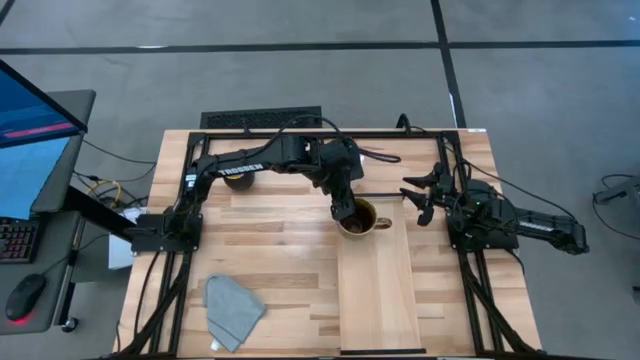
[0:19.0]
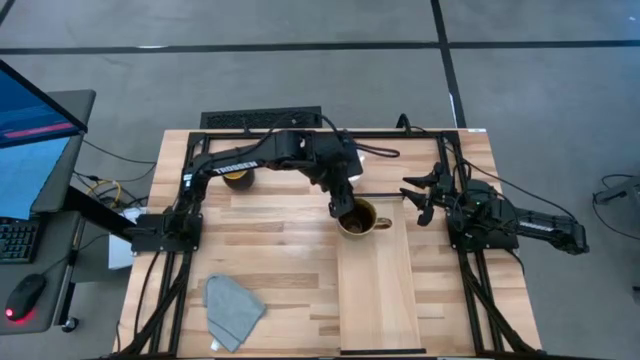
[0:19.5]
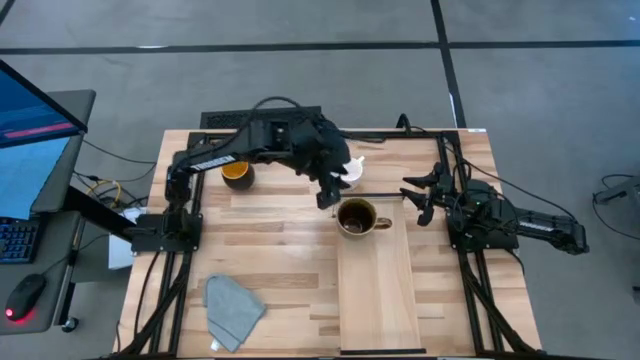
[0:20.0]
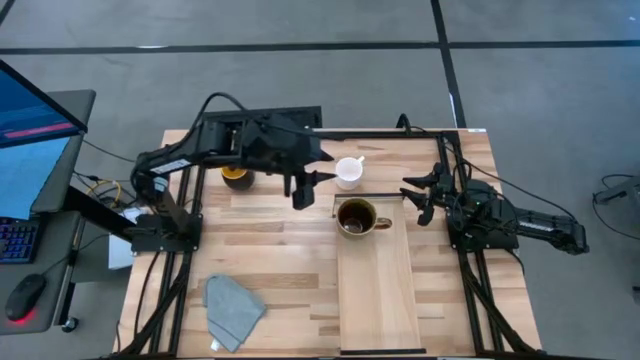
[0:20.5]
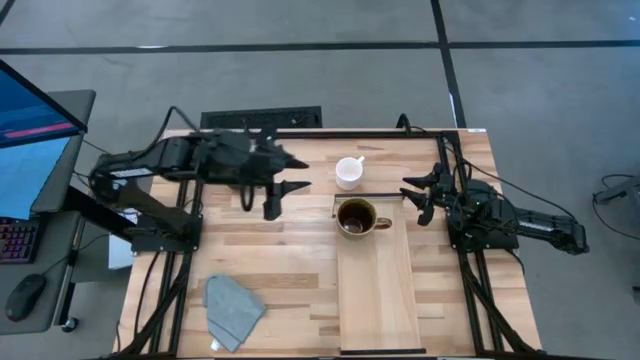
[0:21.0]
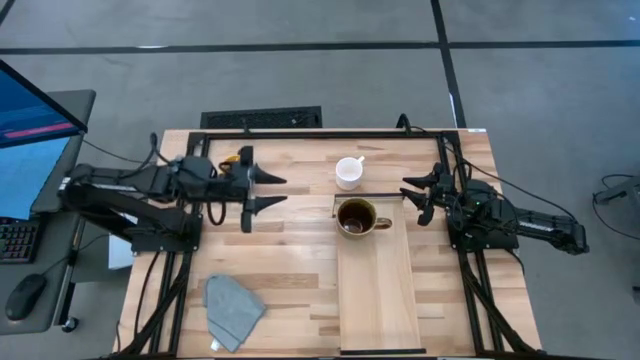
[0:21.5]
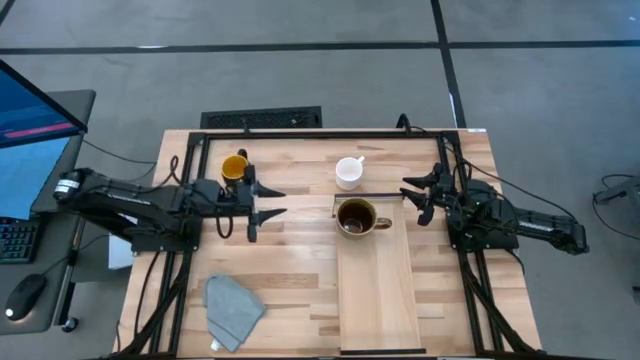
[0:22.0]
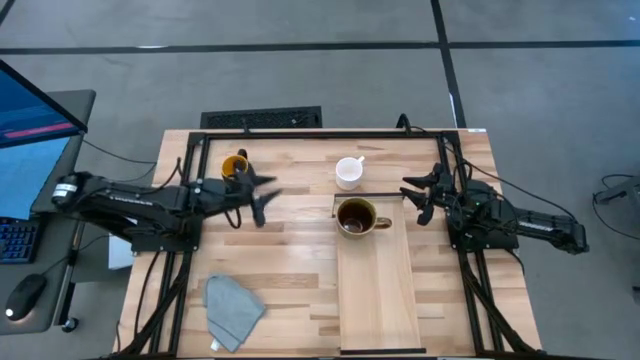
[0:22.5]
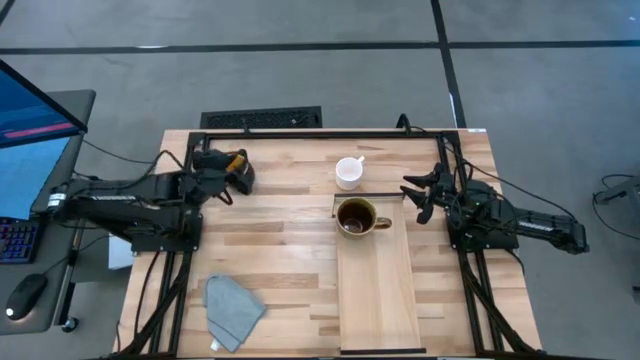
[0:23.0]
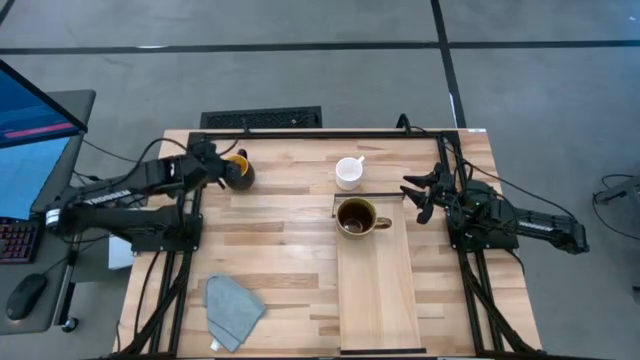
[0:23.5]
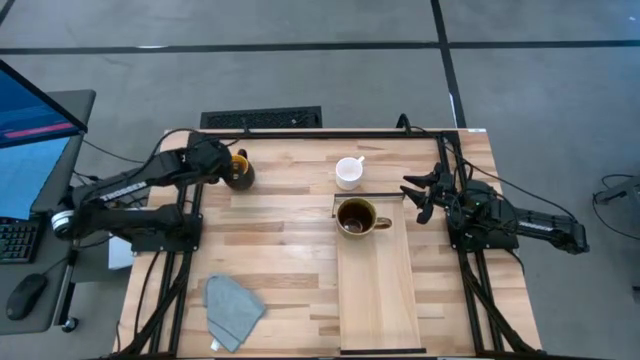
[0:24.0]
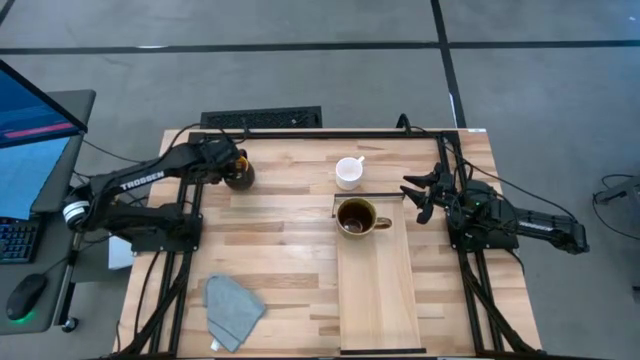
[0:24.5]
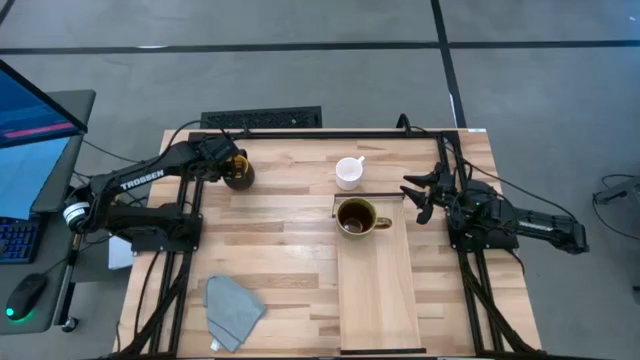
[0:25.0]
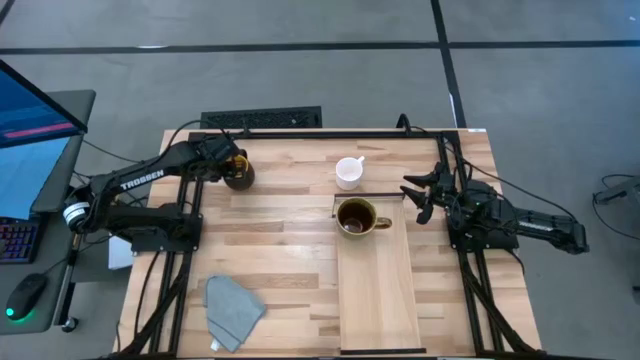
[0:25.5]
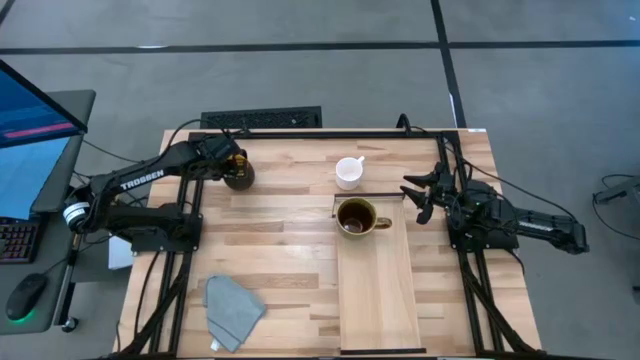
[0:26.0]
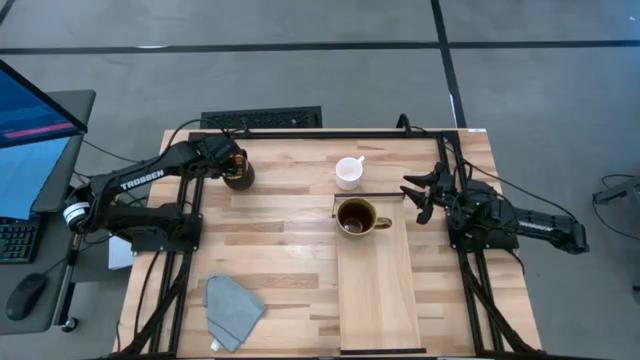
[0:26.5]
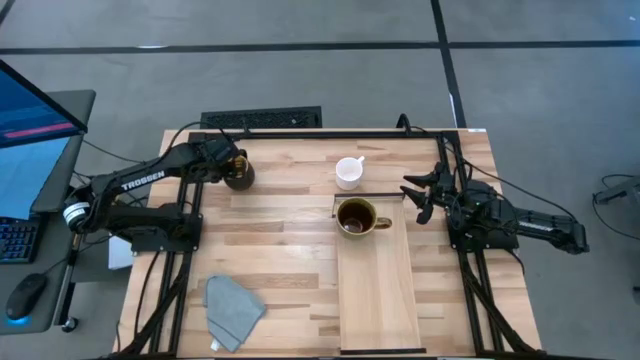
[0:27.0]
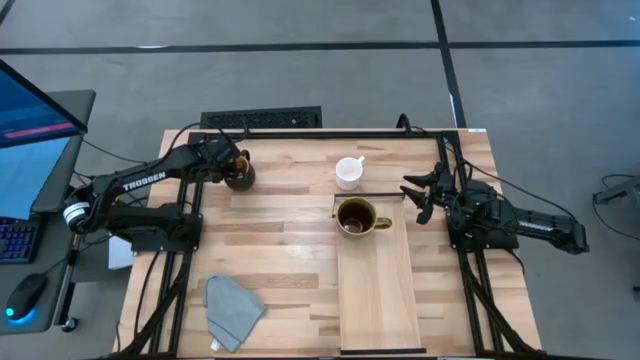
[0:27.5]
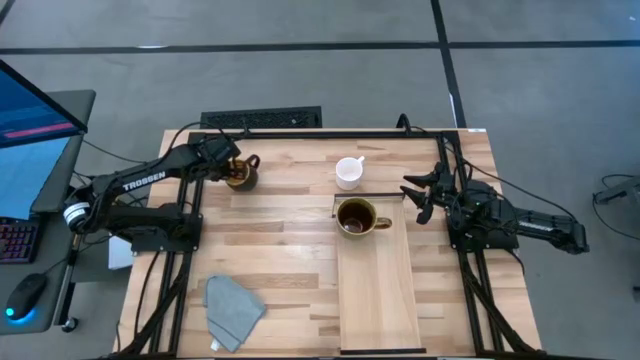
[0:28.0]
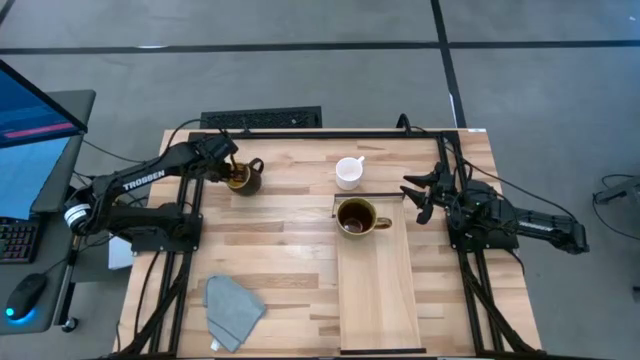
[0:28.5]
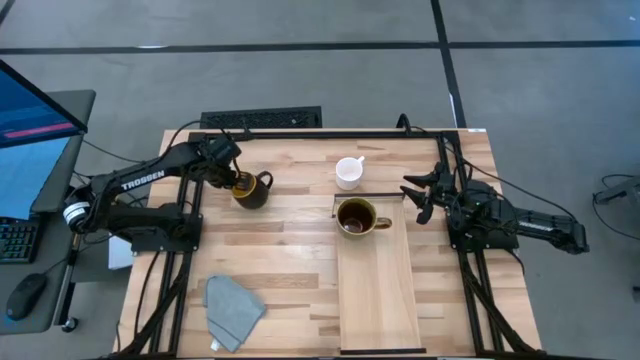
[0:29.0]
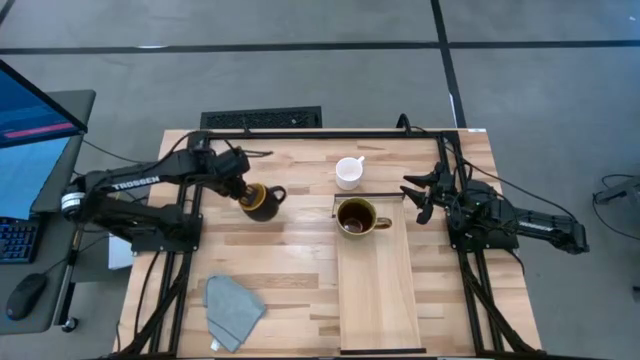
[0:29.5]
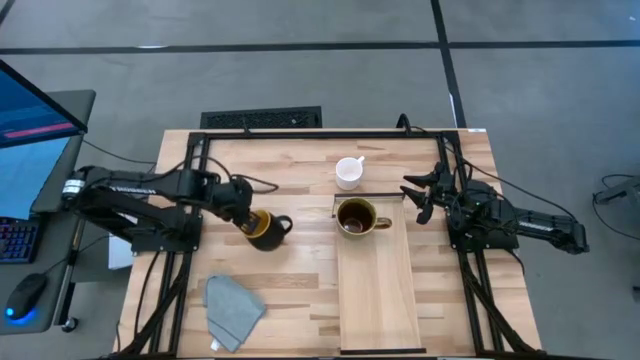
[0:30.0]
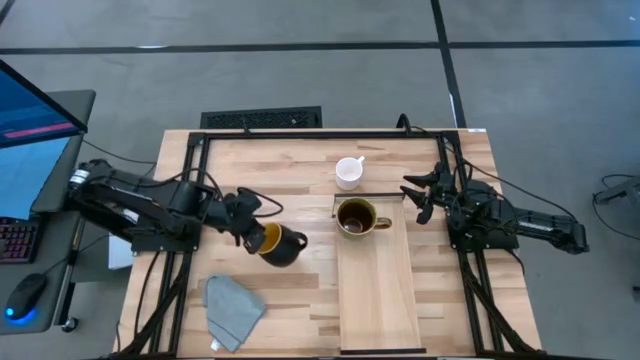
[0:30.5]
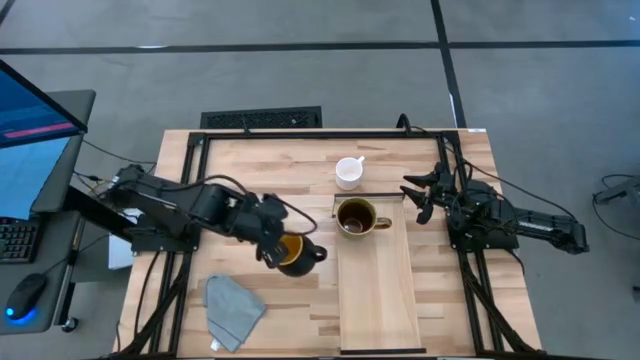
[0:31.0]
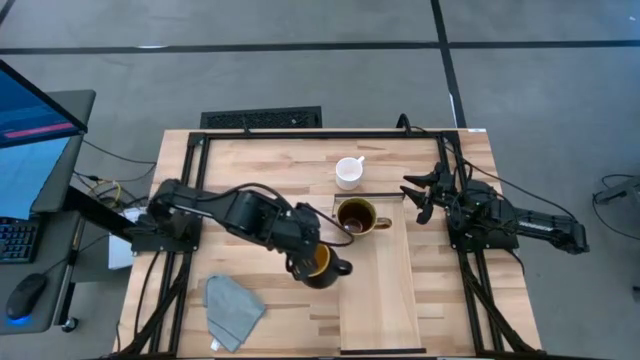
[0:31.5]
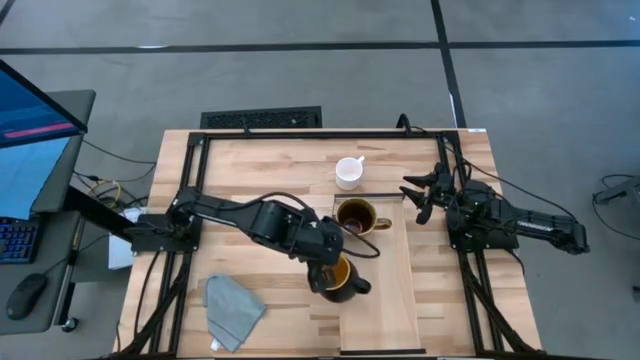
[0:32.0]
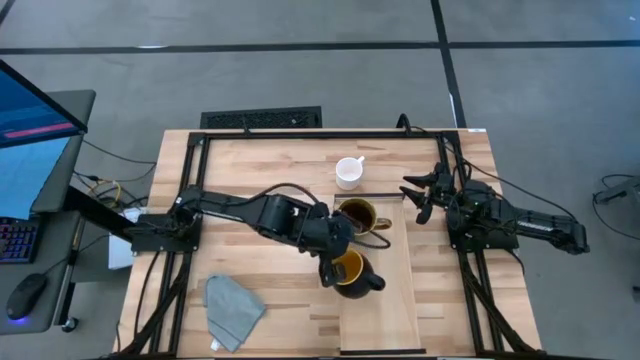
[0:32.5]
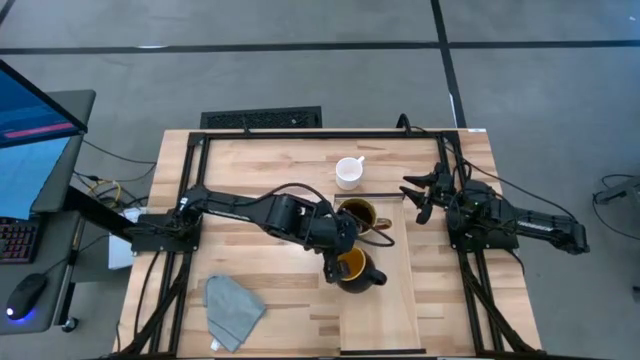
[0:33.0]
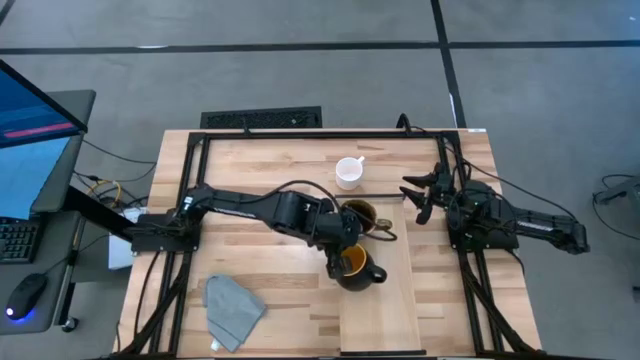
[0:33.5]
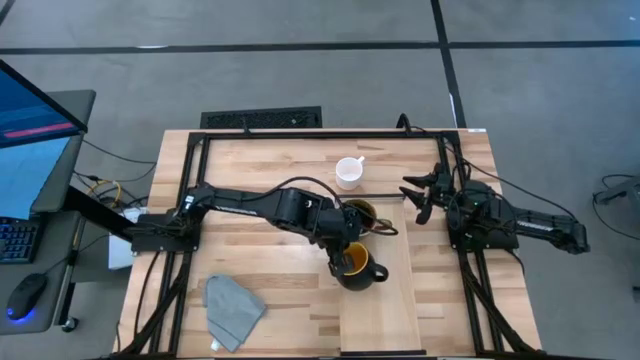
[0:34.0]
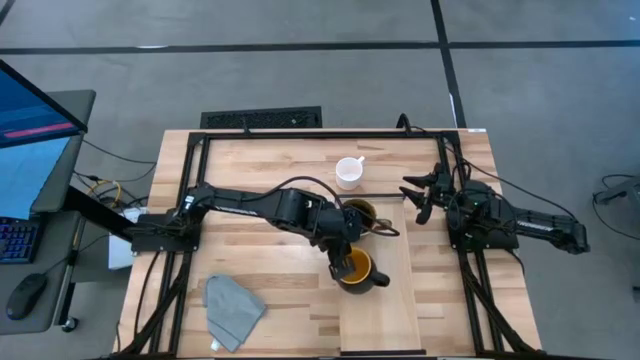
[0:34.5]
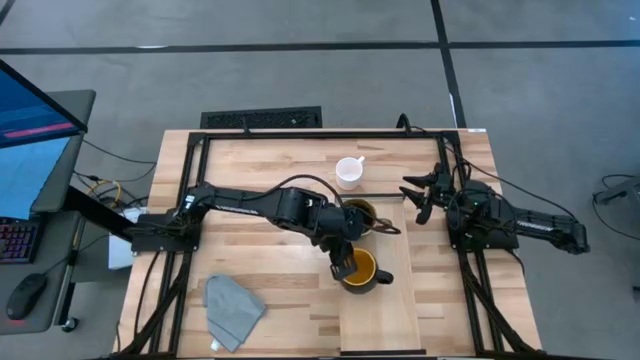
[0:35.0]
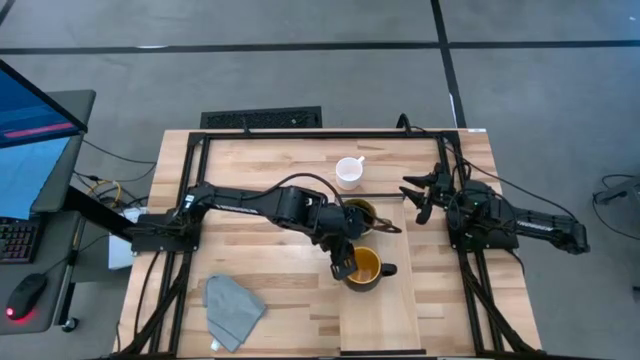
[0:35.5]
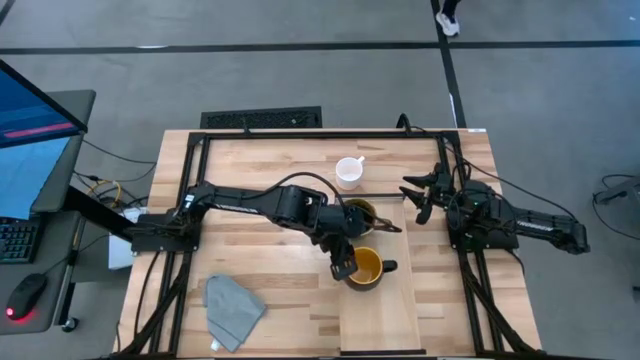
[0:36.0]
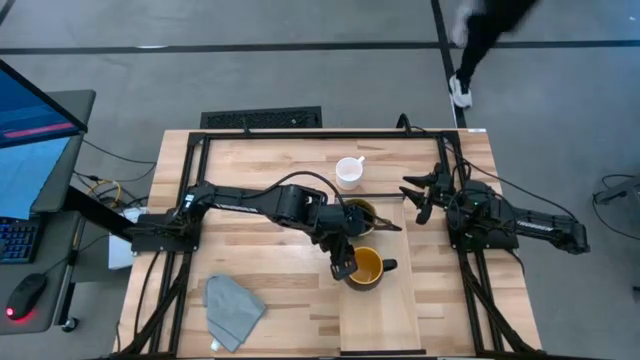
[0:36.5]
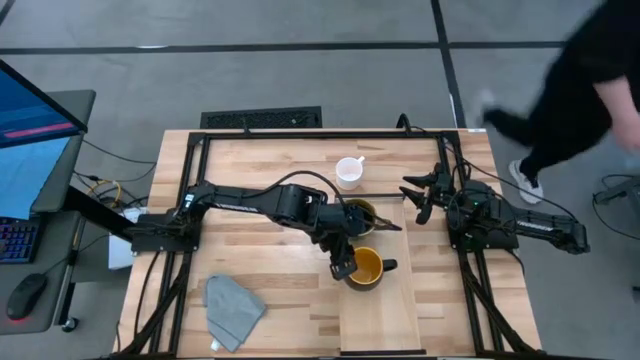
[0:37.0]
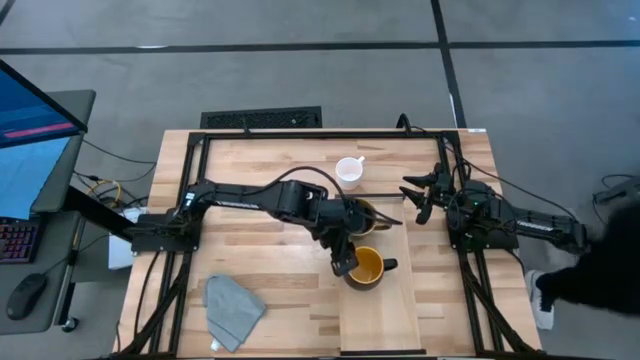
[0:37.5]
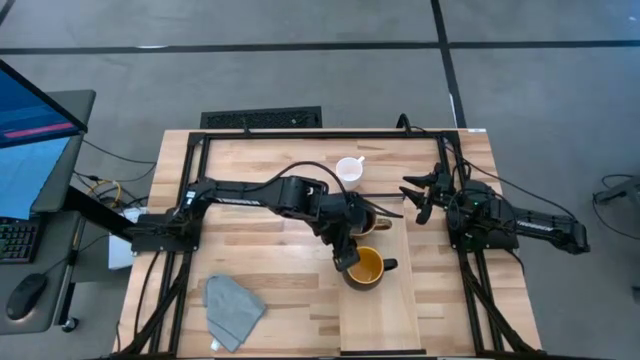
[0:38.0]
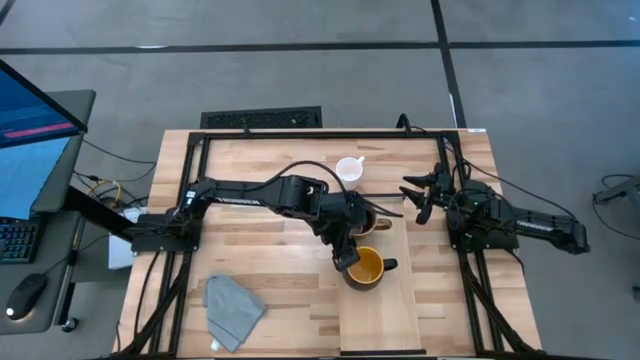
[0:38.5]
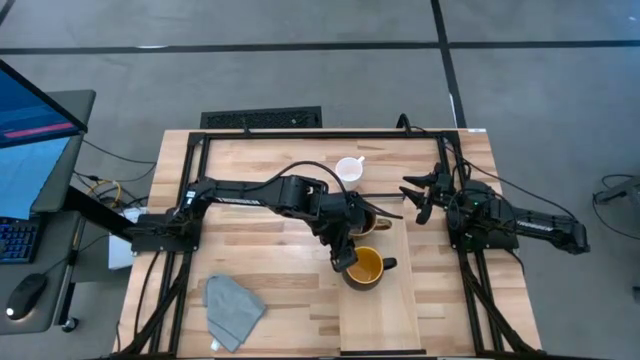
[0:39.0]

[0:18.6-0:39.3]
Task: Stack small to large cups/mugs on shelf
Put the black mug on the shelf
